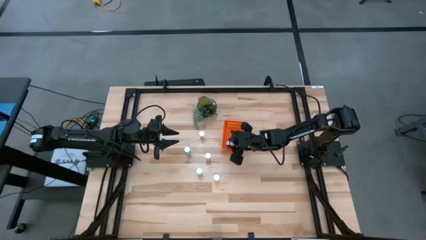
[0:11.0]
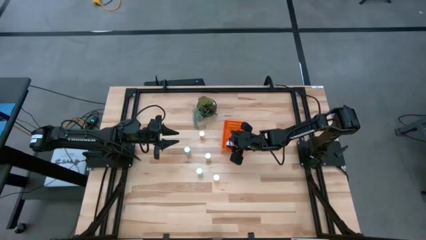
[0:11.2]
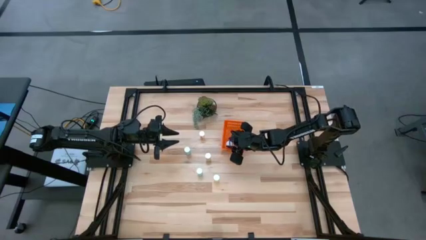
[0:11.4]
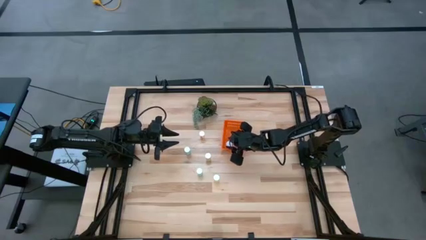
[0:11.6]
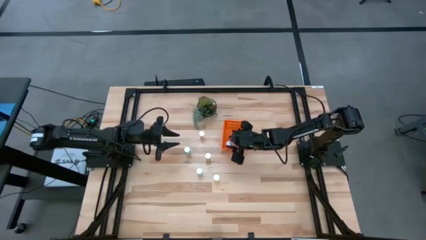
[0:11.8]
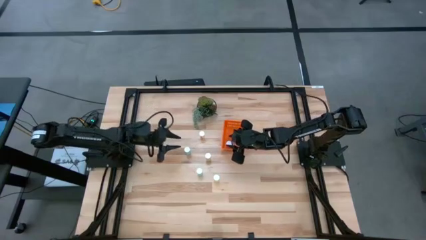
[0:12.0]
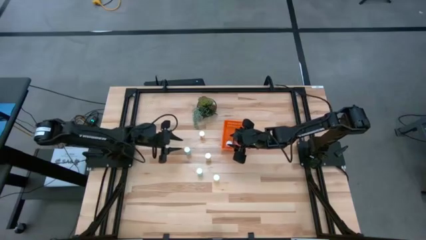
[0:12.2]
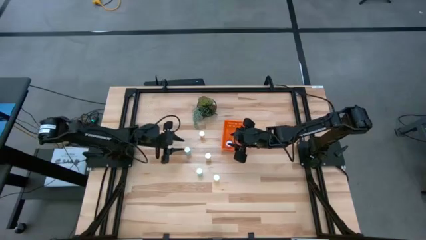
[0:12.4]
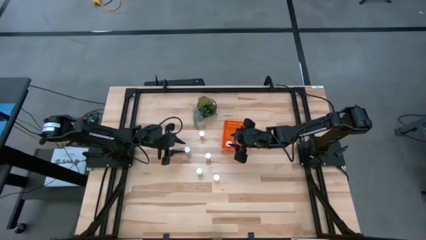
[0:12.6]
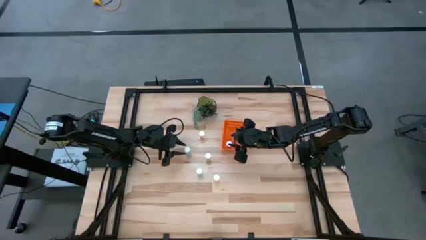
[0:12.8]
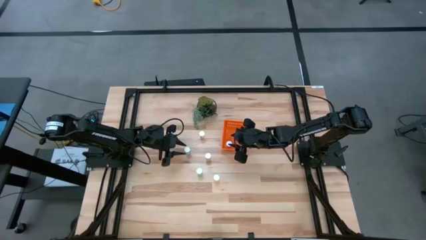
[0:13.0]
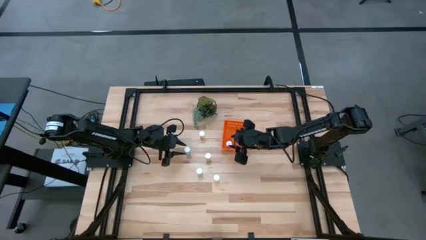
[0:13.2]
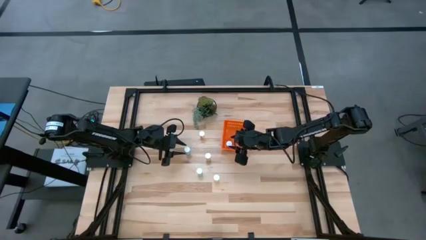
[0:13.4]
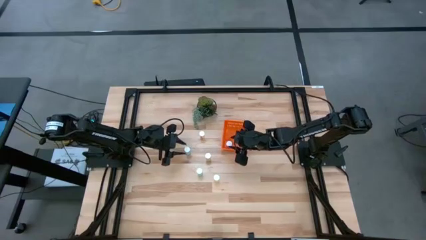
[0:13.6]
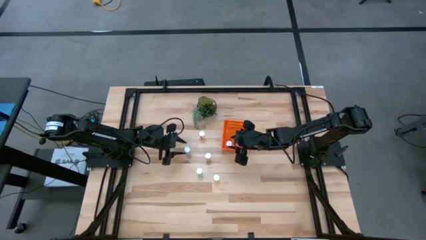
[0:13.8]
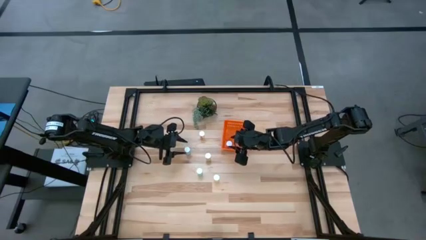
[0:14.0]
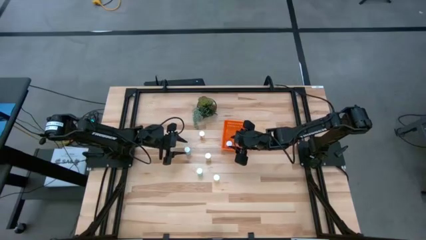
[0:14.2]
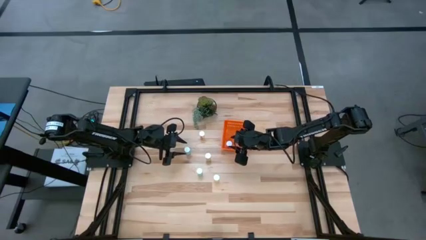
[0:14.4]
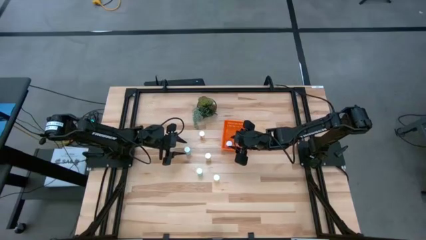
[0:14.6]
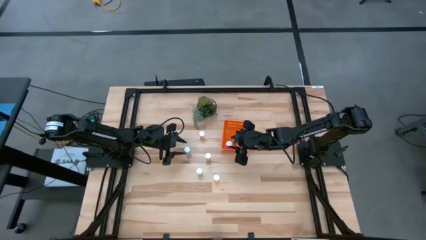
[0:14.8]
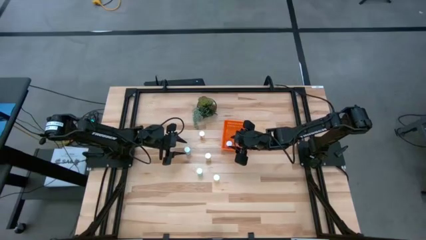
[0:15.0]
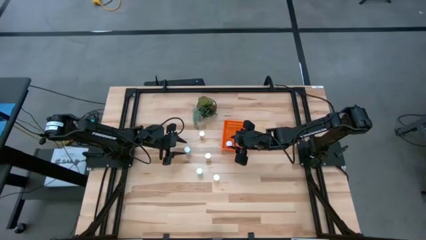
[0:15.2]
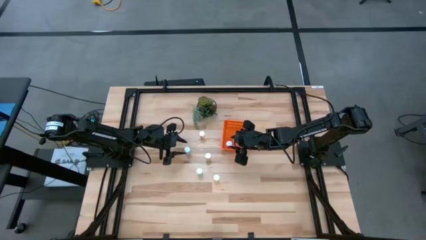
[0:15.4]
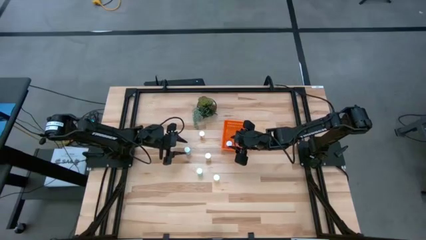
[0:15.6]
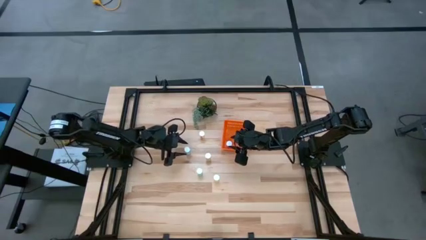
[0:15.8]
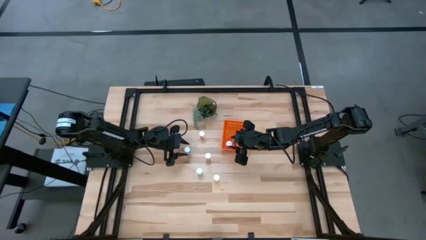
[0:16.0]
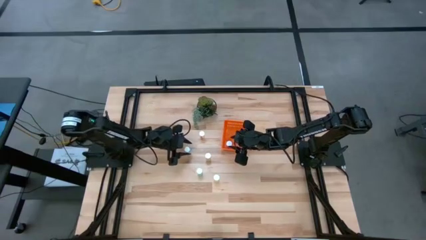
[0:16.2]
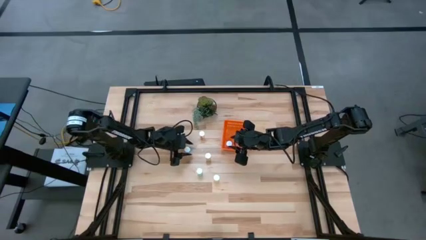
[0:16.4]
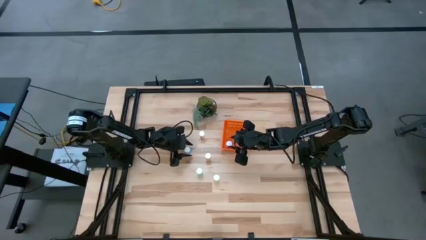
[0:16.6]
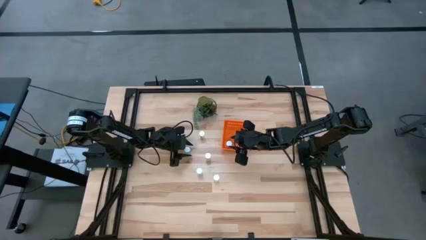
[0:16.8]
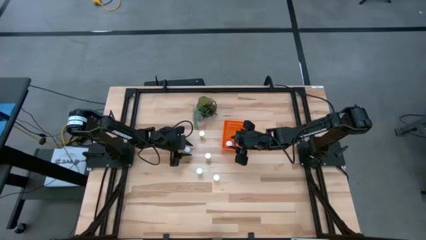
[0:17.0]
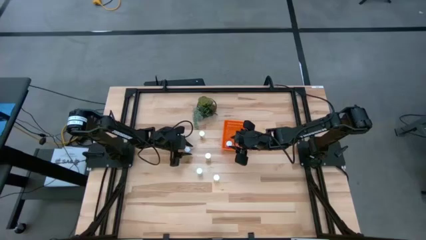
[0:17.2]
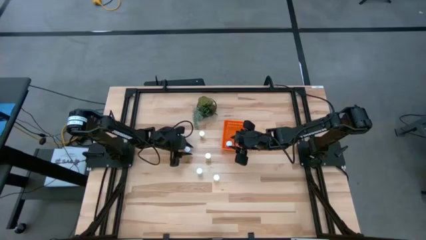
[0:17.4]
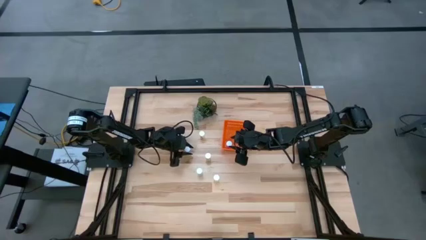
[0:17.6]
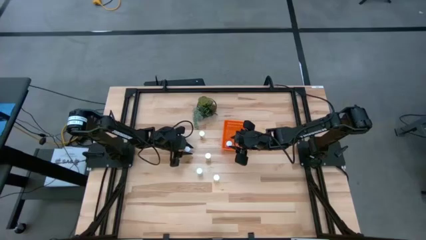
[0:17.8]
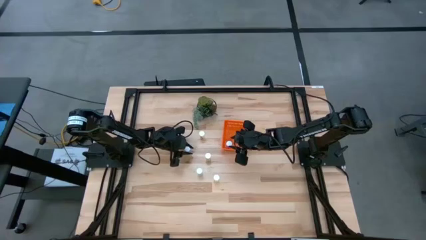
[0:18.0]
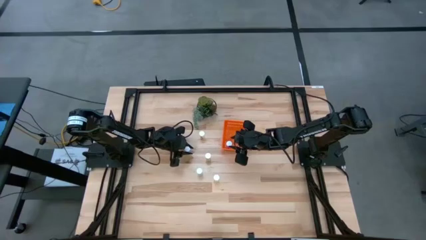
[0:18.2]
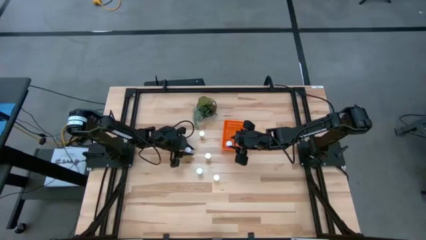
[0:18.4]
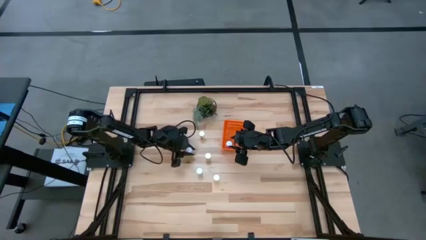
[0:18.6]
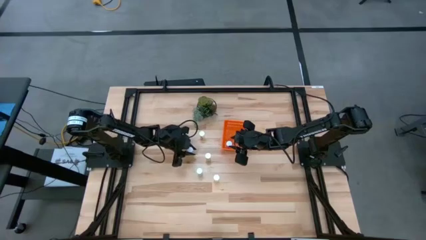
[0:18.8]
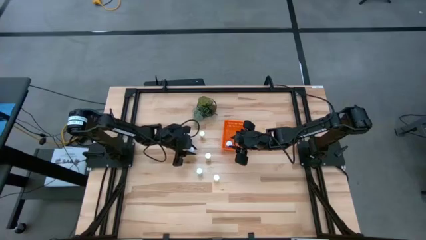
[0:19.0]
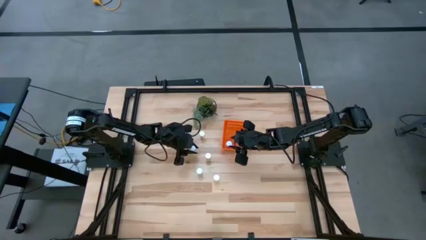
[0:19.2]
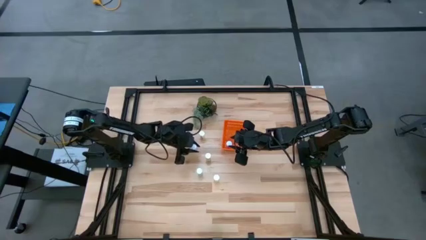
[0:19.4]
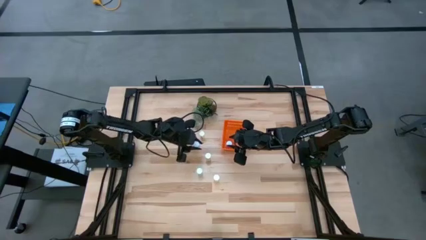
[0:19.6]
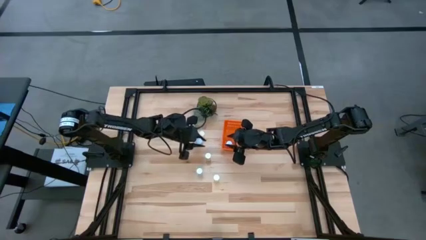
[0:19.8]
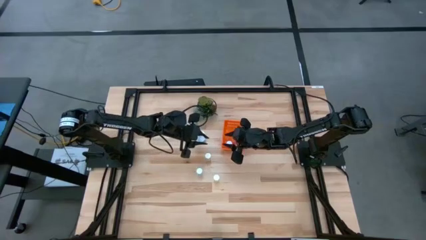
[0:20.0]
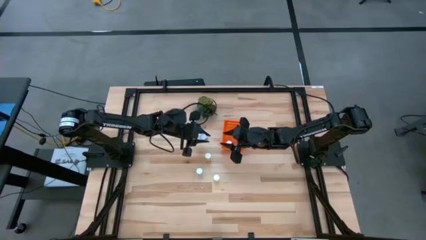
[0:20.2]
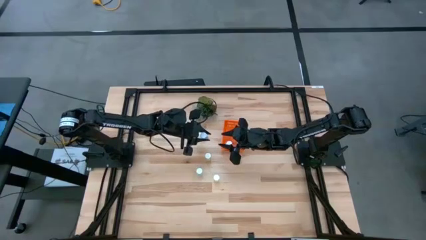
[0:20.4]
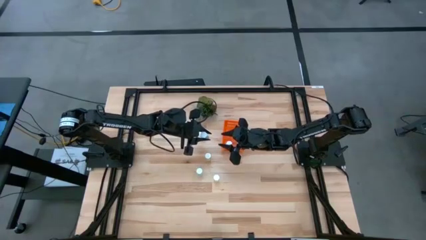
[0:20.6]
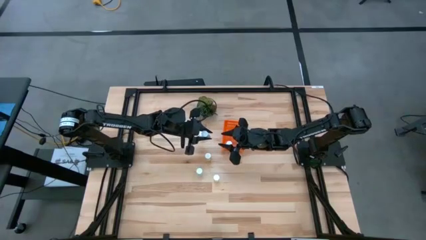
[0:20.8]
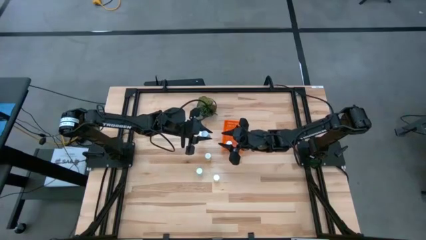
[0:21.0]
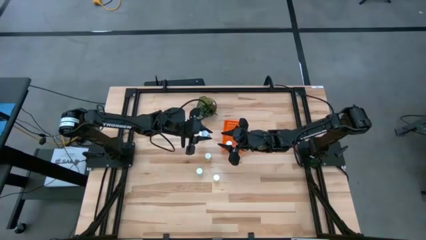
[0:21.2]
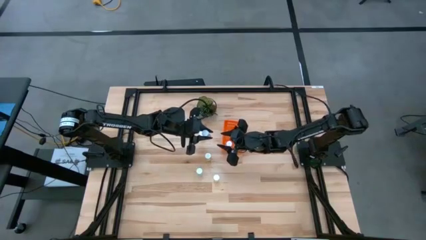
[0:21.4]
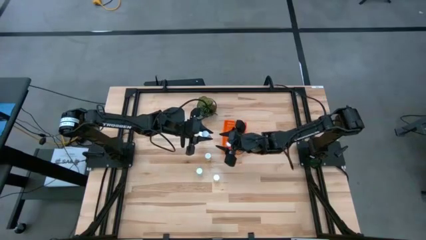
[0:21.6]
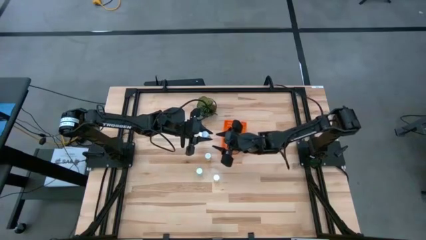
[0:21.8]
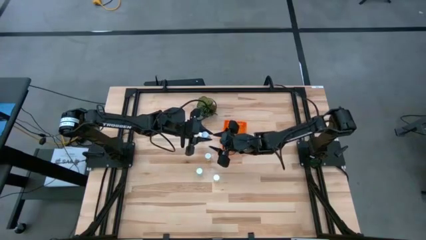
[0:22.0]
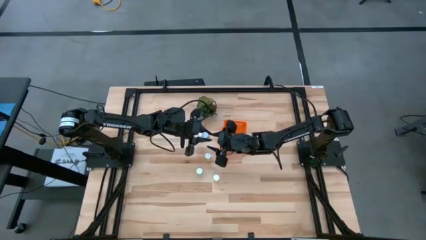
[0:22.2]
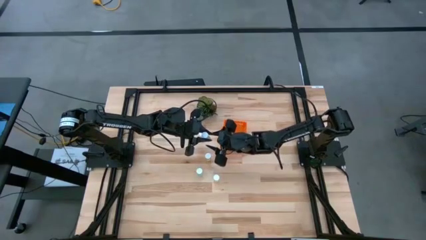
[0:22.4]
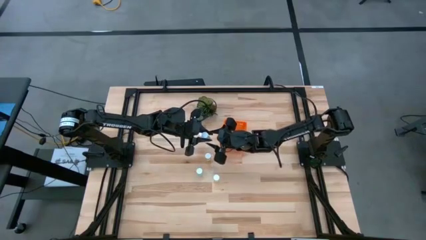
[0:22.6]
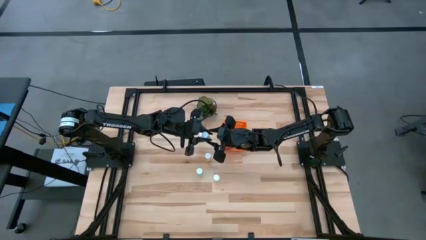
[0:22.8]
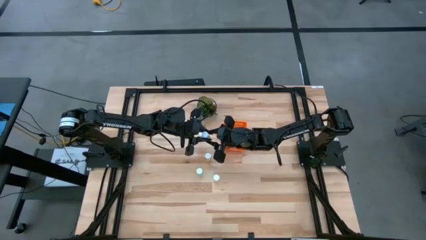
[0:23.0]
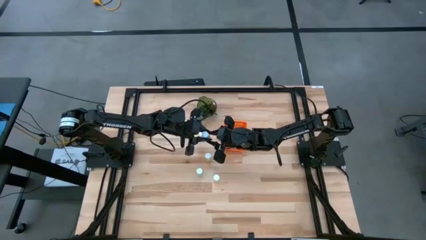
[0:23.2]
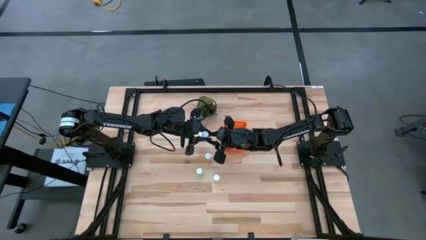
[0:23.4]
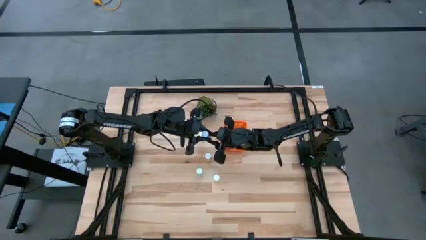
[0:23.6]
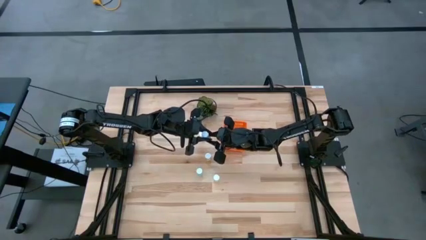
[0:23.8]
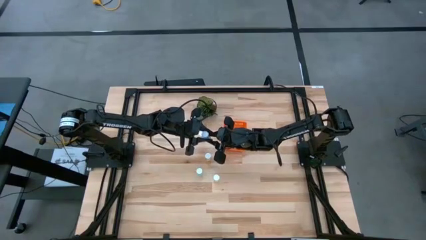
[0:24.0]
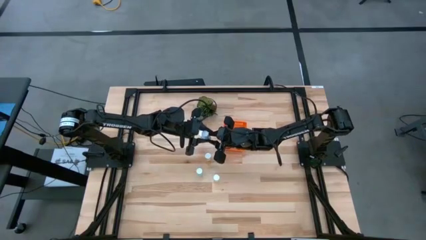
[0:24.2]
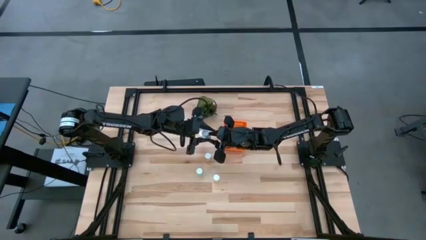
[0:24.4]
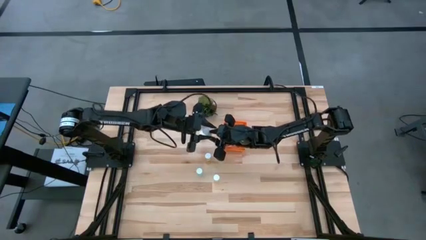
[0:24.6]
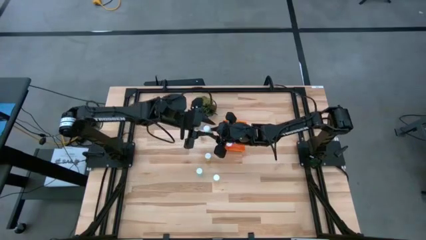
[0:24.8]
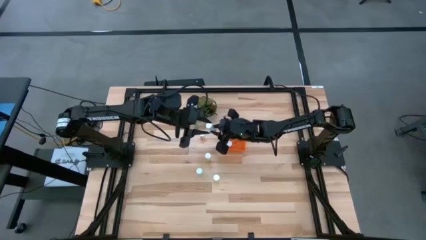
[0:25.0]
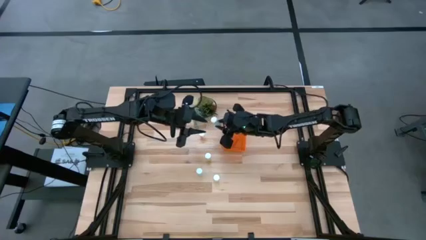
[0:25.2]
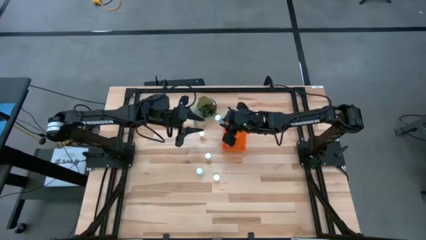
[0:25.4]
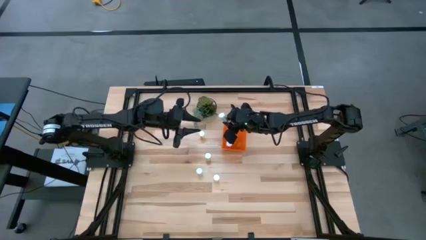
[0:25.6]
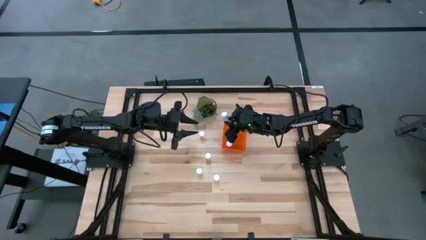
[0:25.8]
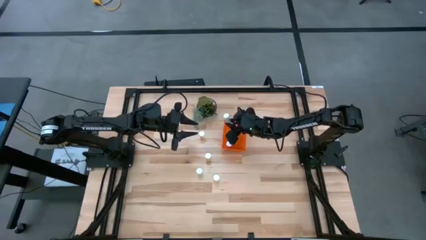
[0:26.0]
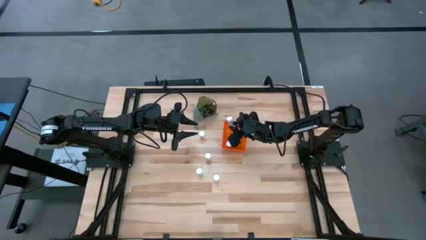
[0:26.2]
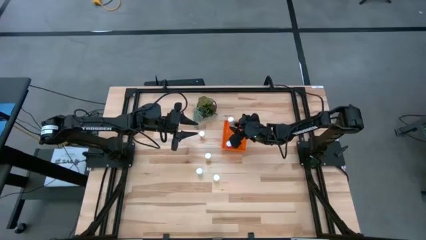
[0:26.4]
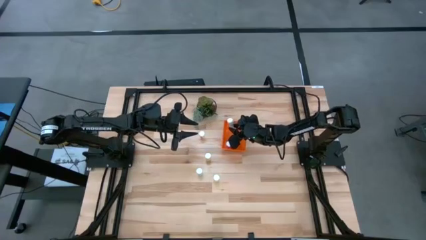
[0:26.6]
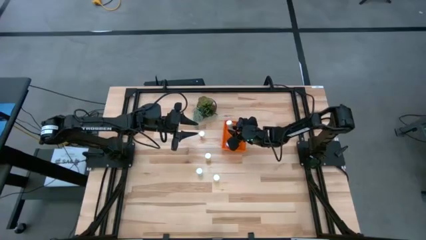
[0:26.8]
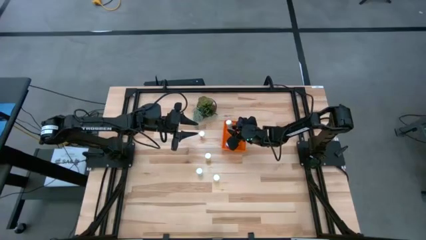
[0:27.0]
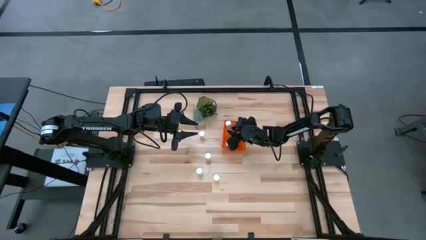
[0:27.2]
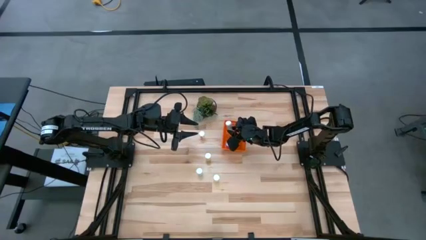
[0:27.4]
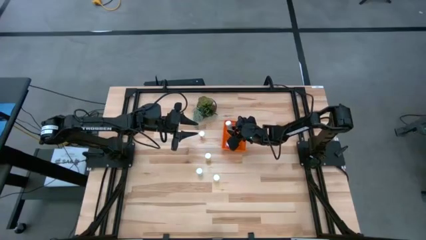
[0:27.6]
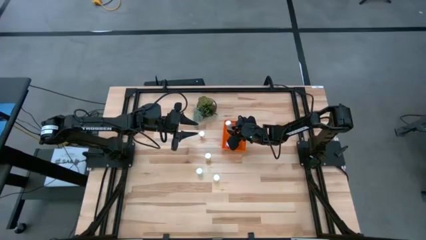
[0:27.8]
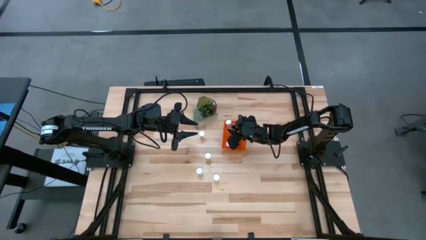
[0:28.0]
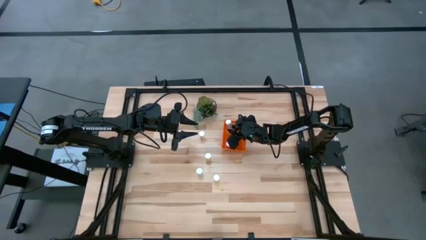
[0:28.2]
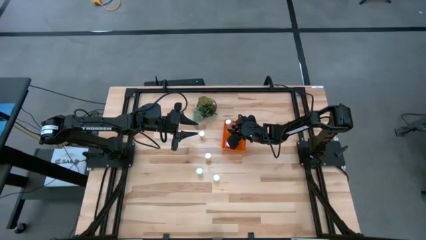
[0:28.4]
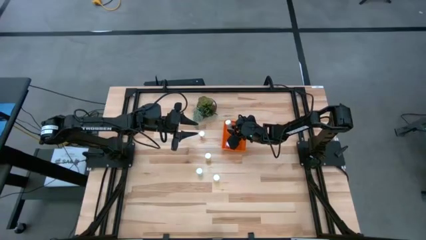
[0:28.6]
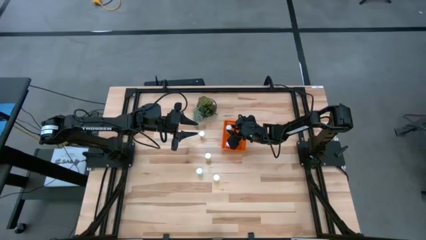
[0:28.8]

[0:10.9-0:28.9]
Task: Pick and place pill bottles into a basket
Put the top blue pill bottle into the basket
